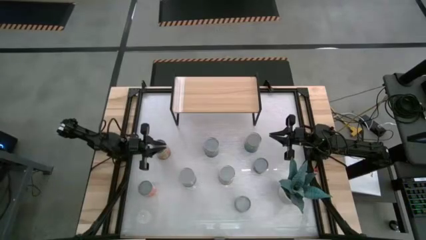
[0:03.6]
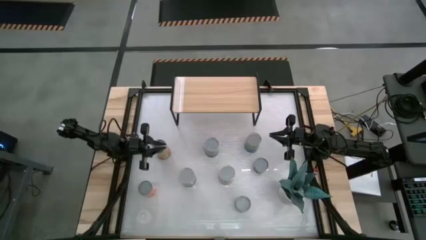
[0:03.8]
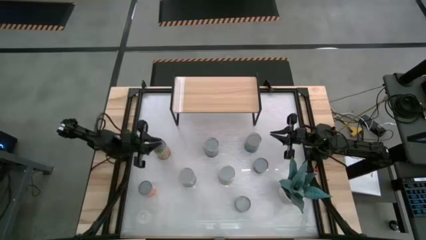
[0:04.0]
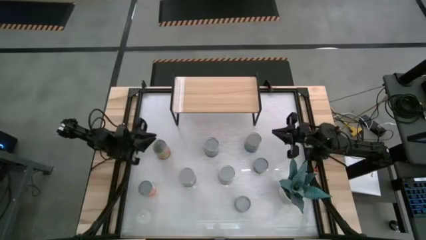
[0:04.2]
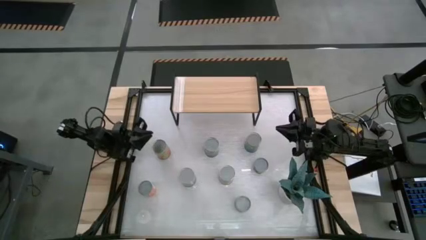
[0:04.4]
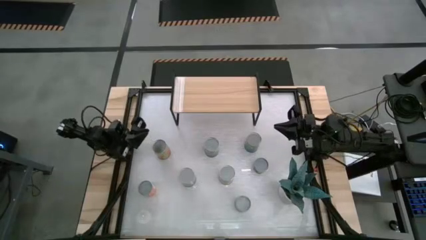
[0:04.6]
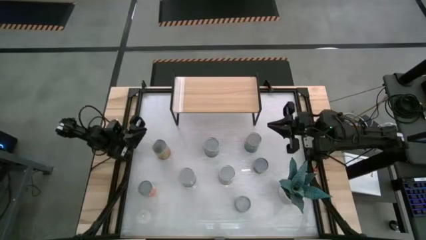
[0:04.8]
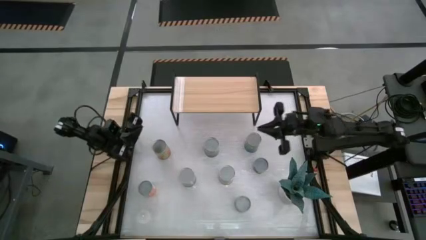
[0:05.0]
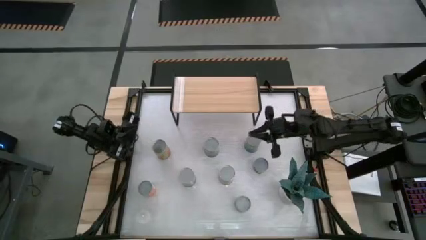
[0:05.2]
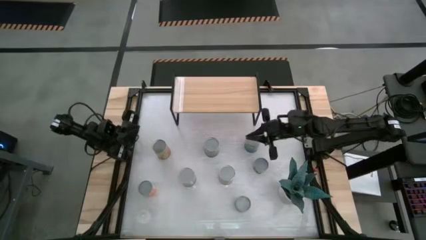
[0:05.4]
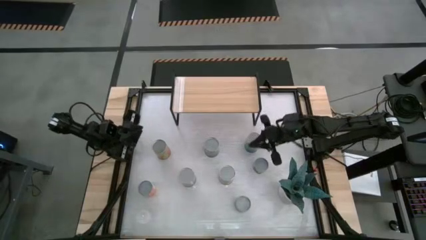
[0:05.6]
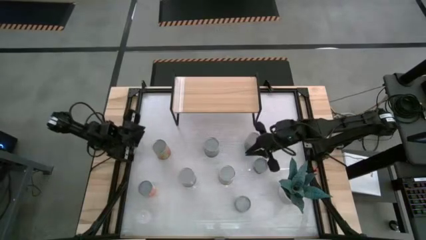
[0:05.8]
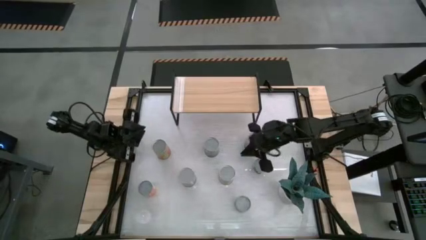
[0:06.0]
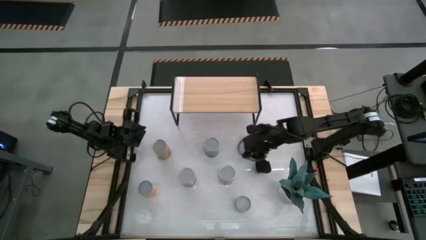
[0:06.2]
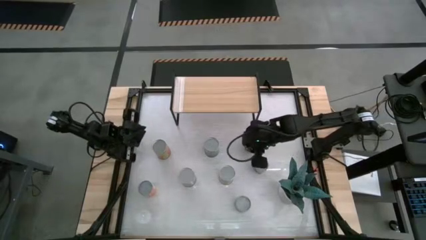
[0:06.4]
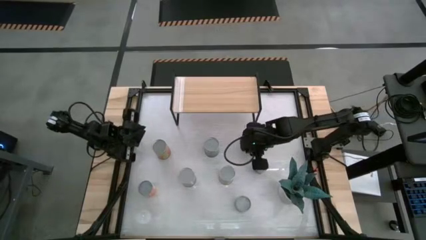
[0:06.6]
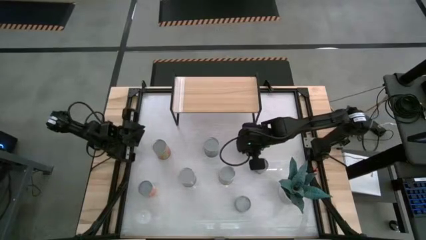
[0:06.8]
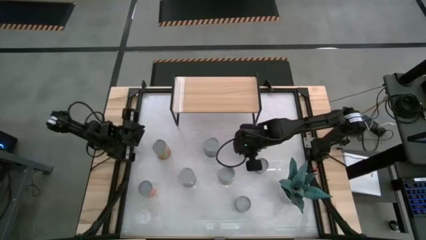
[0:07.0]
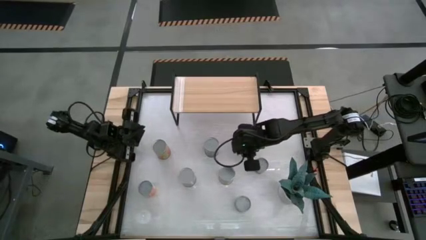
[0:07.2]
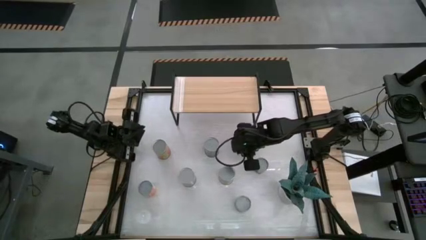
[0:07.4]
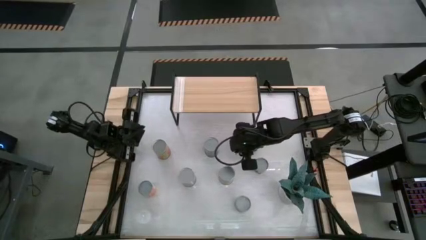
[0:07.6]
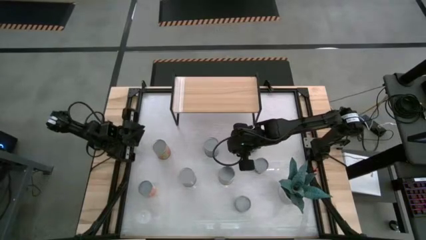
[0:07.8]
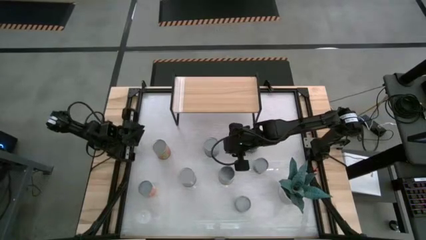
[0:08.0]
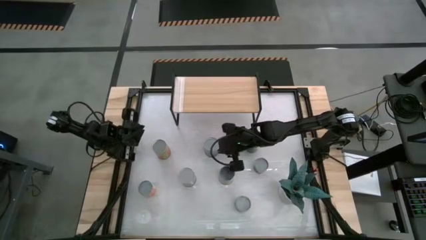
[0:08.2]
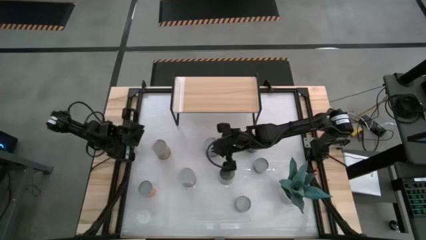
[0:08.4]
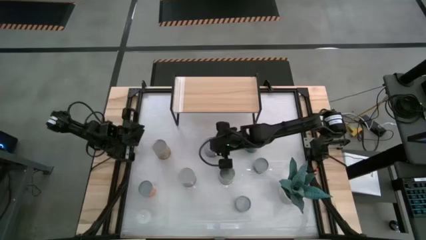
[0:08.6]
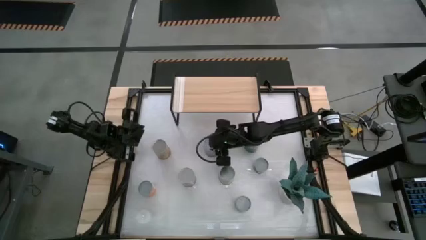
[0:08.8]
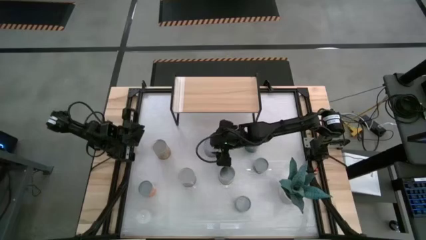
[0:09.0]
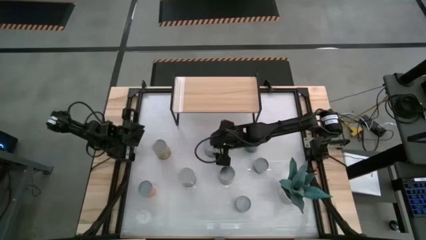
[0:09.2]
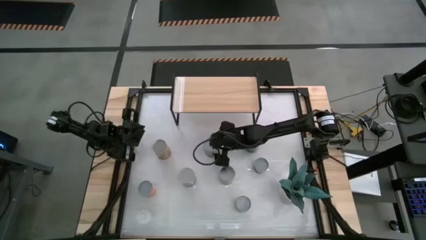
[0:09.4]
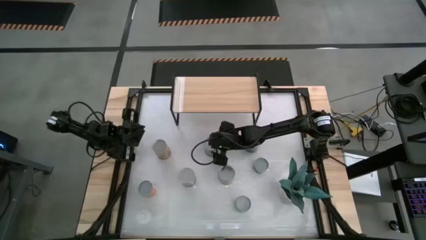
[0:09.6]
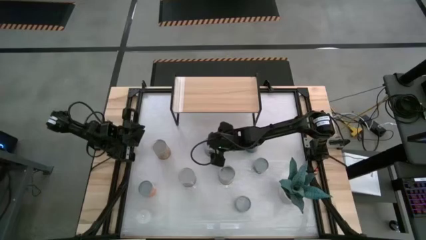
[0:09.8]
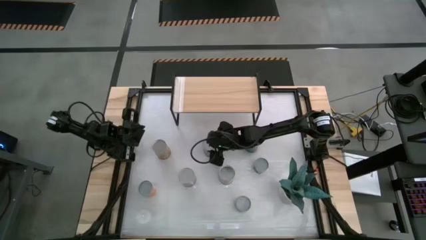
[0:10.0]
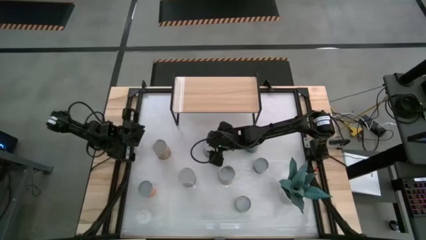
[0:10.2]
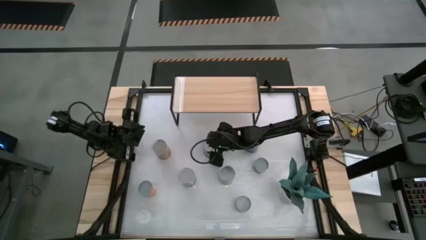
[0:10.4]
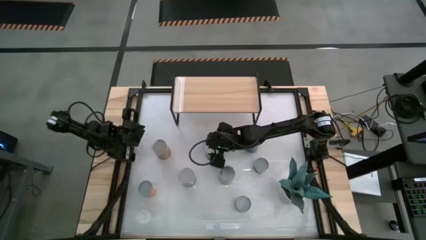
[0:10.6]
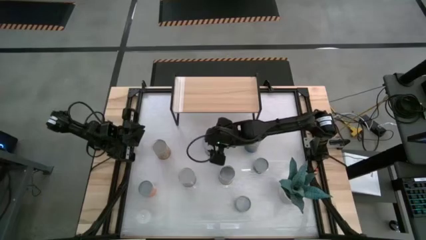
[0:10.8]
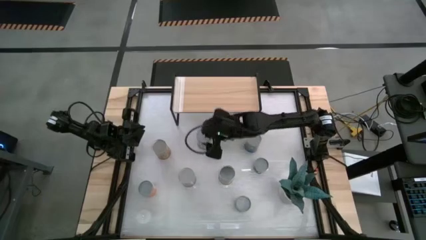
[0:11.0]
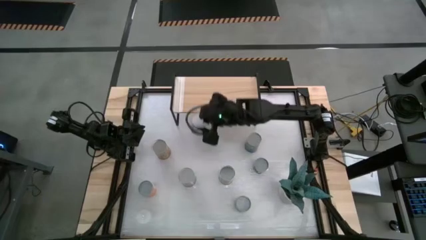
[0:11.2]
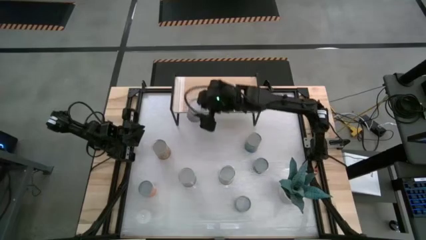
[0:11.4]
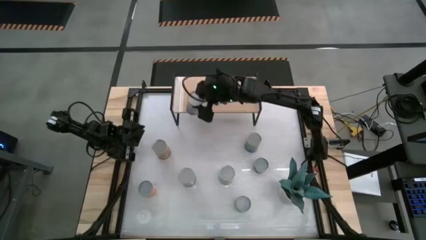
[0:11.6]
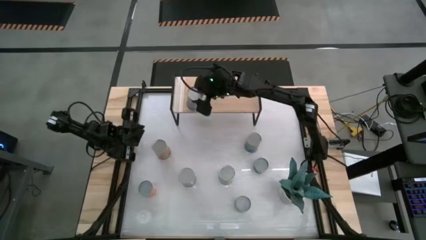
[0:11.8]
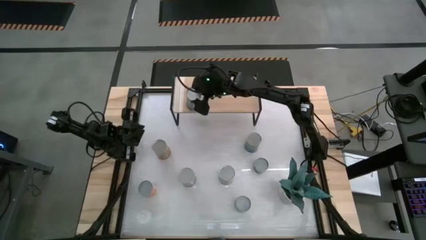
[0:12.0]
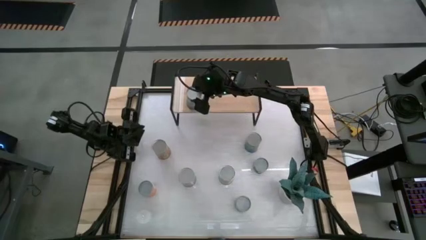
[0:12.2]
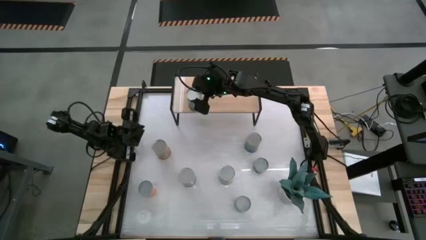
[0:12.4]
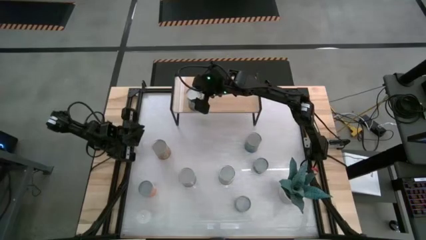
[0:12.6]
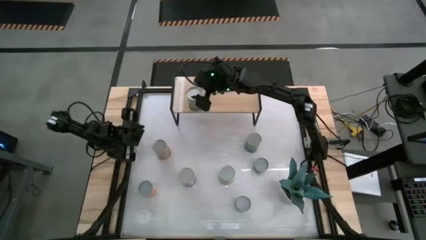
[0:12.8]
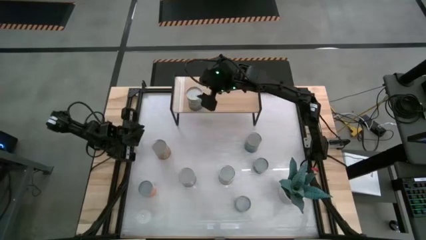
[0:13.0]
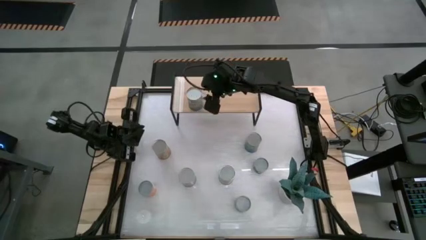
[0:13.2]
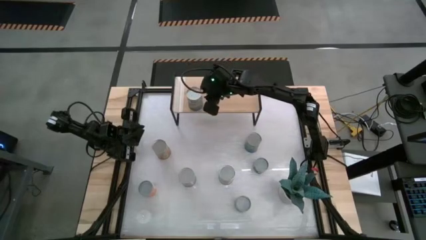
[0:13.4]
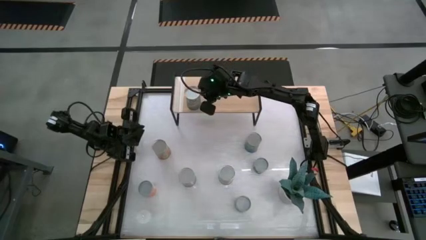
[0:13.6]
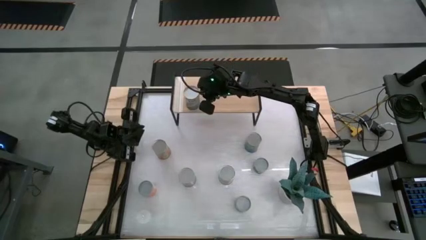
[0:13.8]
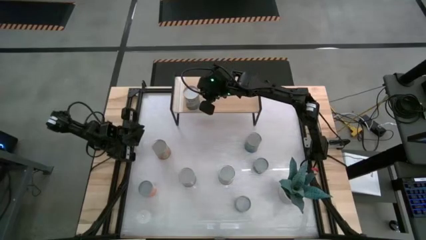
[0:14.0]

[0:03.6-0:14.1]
Task: Pick and place cans onto a shelf
Put the top large canned peas on the shelf

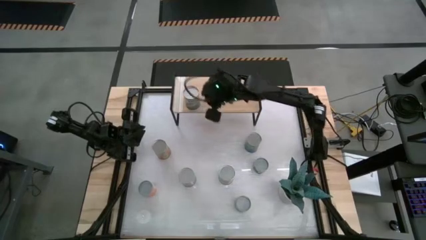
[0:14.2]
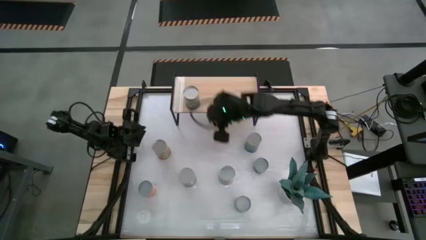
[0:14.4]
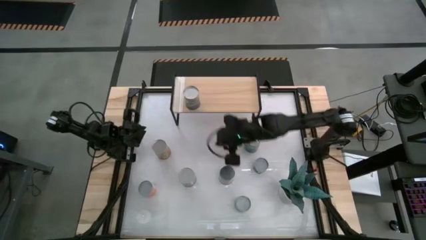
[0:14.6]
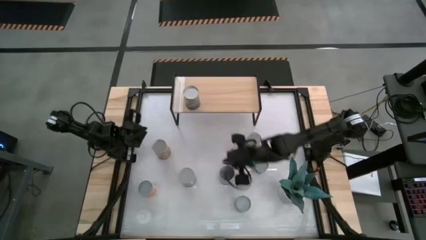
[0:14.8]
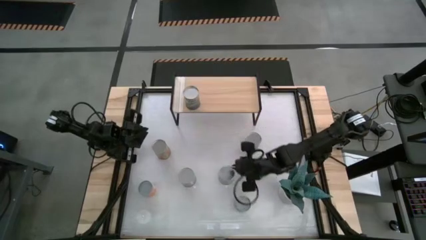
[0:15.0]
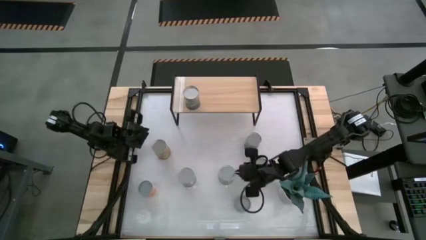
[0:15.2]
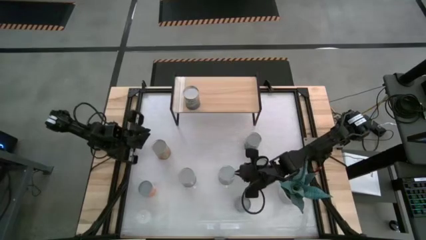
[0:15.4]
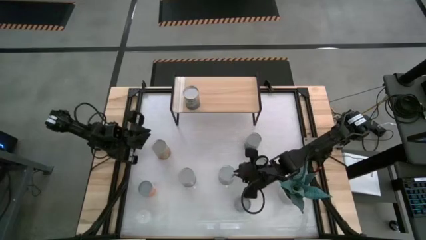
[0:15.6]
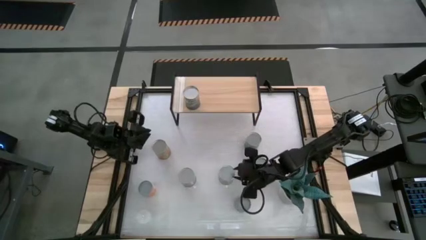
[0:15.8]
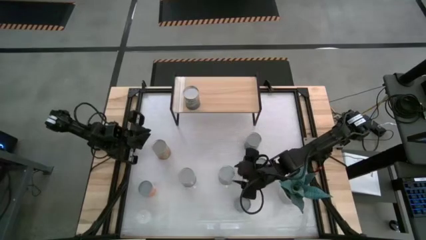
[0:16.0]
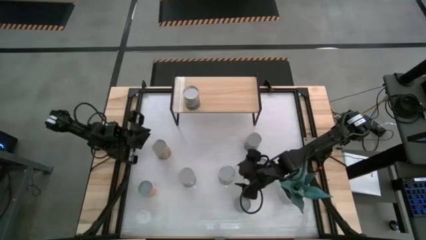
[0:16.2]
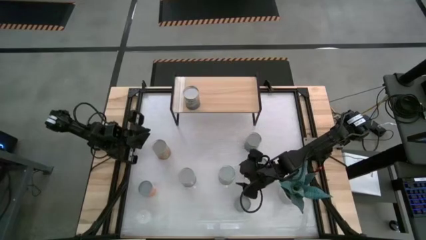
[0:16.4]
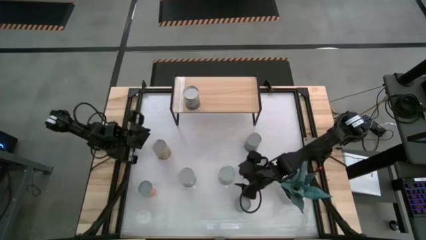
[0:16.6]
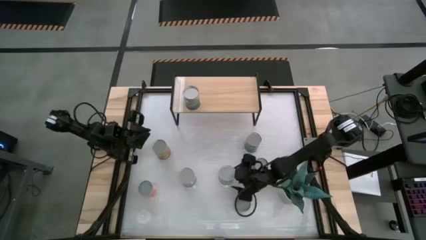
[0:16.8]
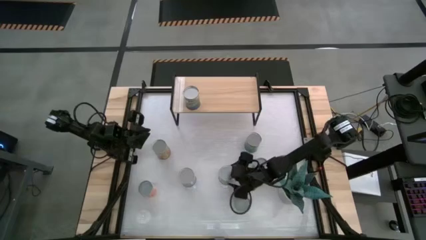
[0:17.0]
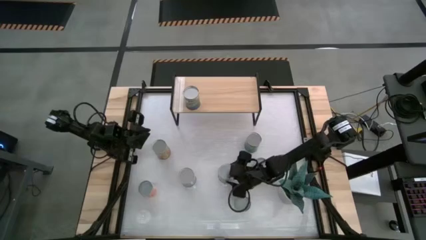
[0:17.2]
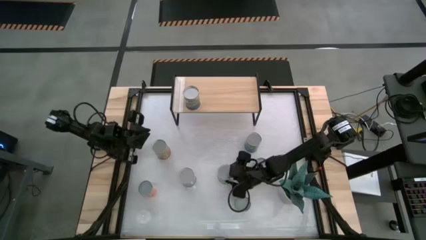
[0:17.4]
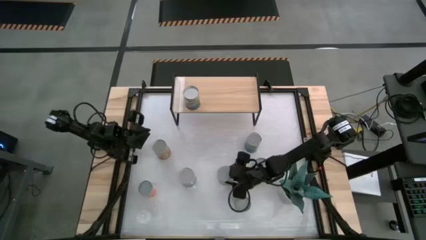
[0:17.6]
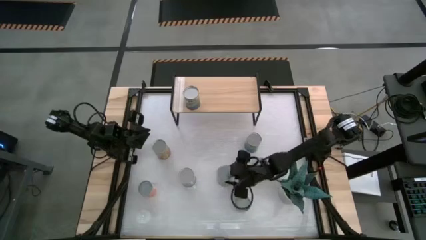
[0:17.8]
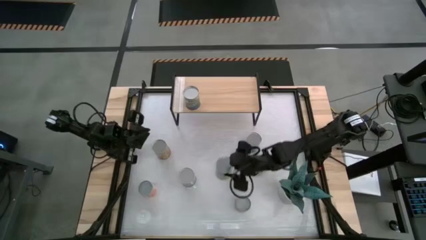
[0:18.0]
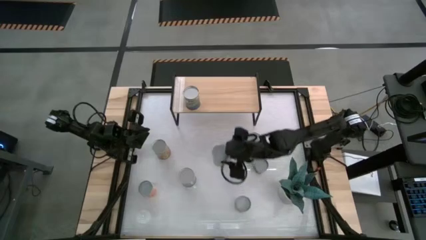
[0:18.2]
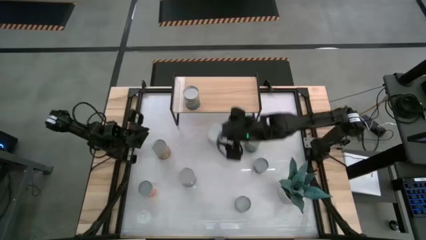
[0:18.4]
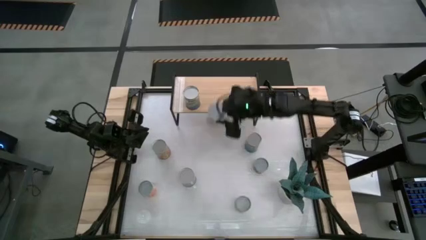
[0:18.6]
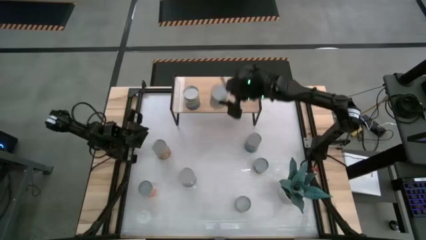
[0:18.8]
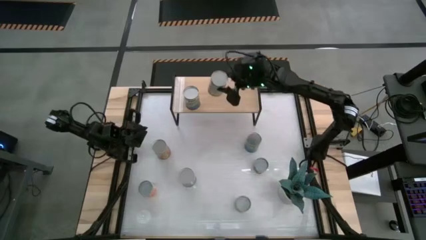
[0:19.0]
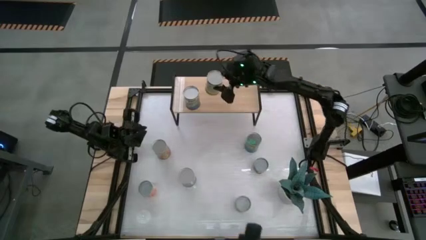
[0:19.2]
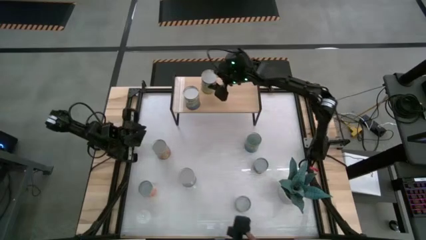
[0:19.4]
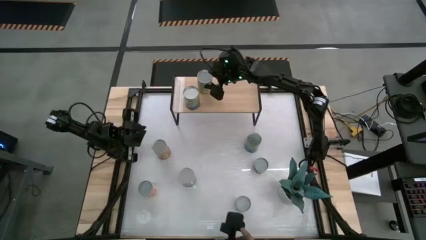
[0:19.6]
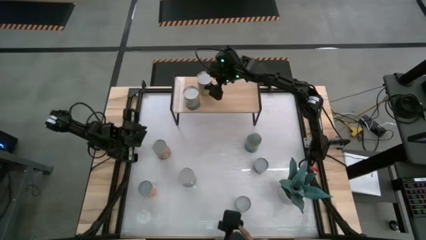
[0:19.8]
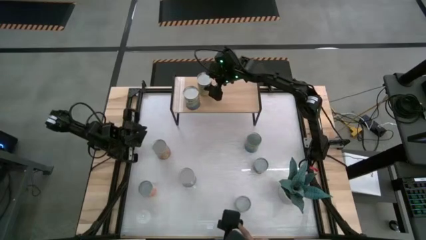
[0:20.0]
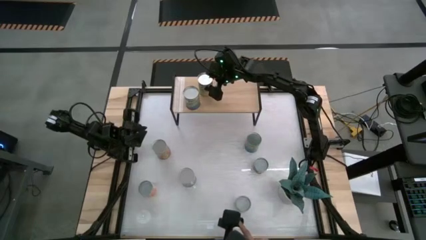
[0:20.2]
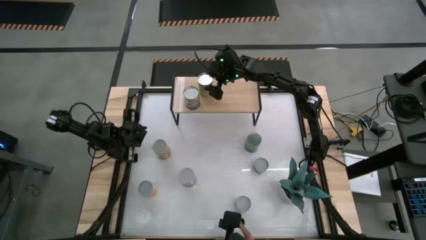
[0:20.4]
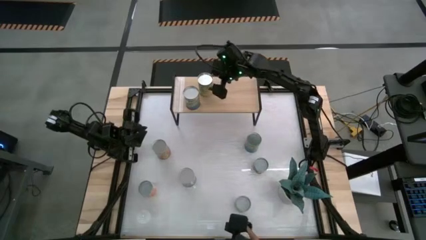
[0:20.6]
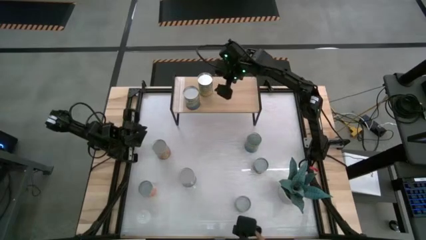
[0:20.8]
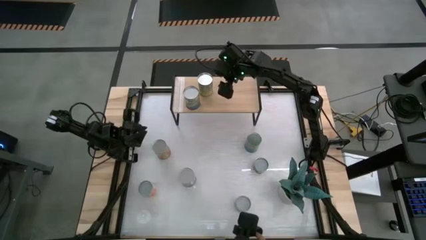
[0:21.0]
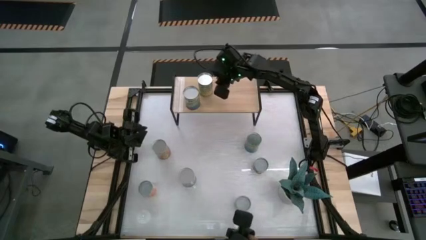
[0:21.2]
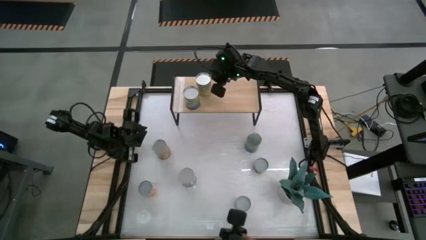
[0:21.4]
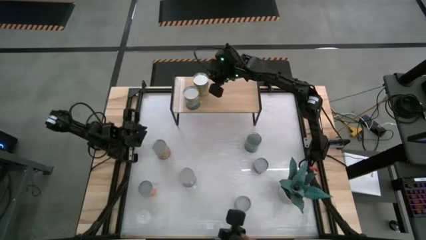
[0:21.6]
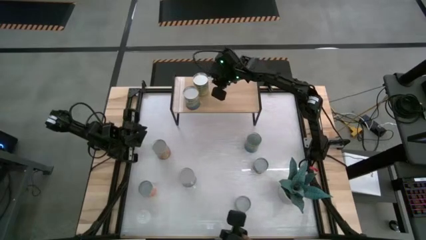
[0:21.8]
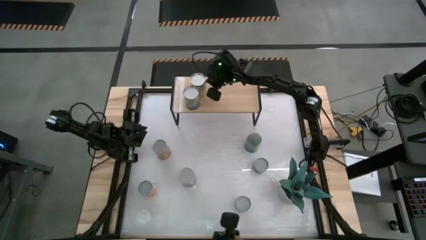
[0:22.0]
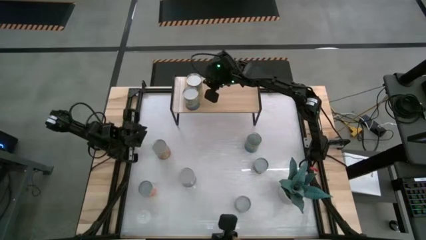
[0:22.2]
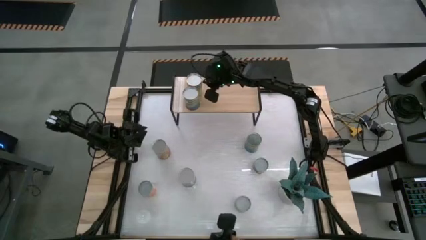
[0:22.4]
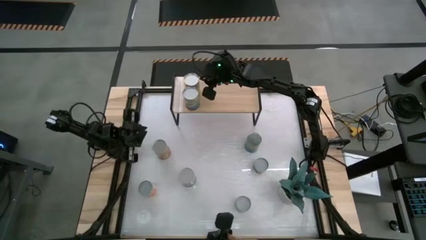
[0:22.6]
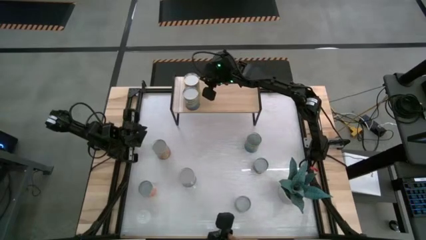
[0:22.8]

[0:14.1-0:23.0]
Put the canned carrots on the shelf
